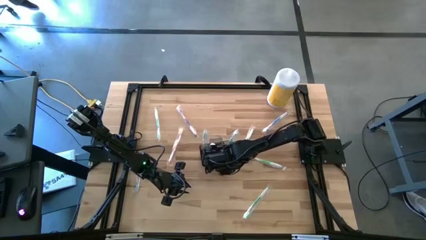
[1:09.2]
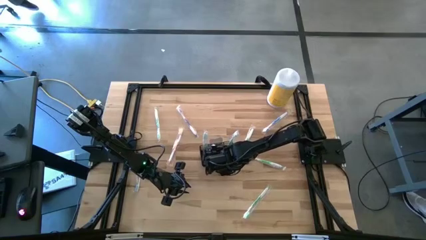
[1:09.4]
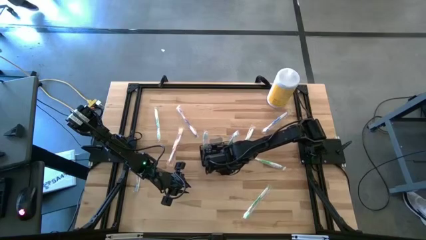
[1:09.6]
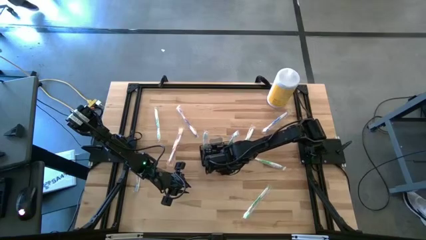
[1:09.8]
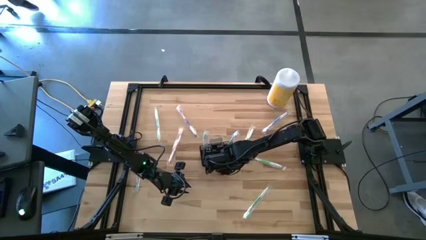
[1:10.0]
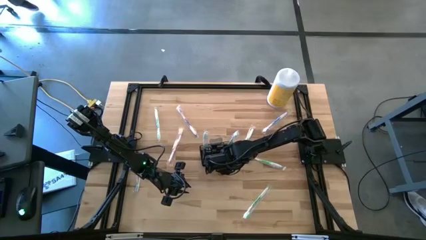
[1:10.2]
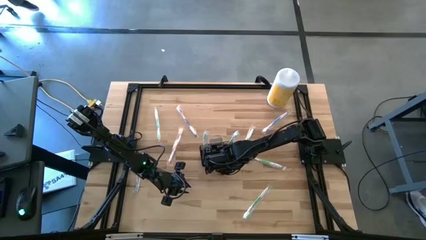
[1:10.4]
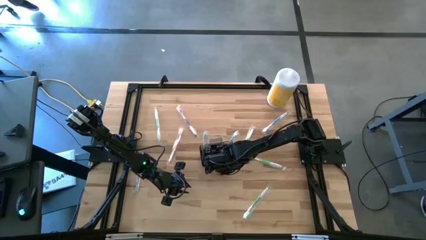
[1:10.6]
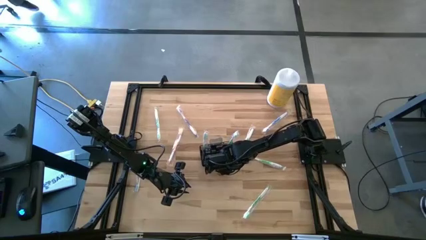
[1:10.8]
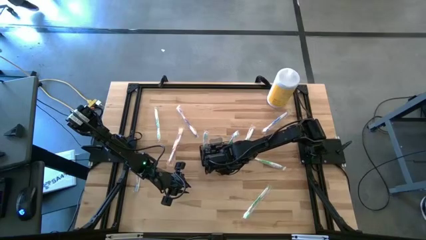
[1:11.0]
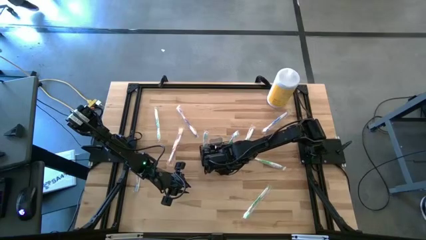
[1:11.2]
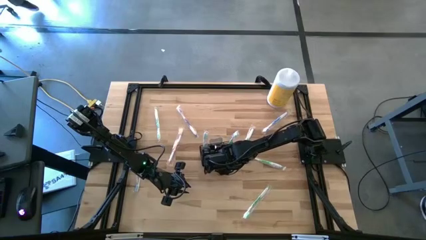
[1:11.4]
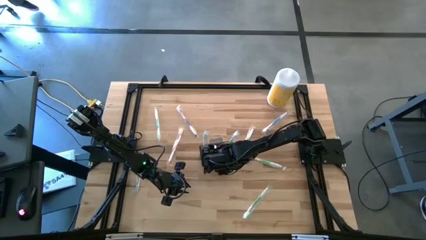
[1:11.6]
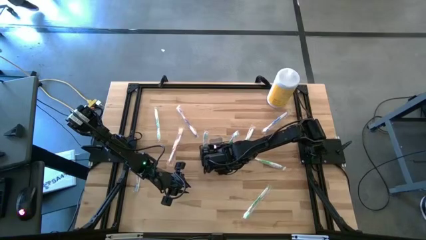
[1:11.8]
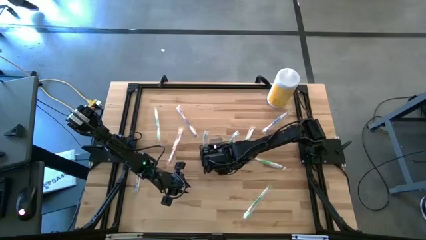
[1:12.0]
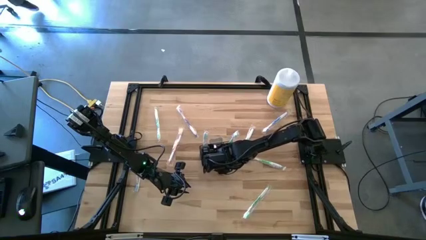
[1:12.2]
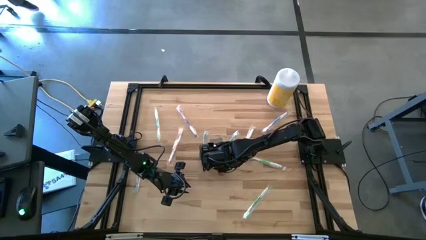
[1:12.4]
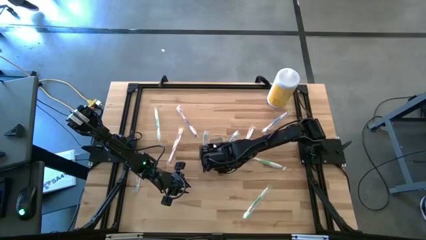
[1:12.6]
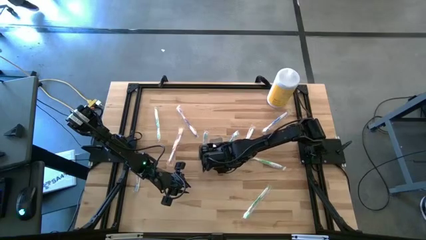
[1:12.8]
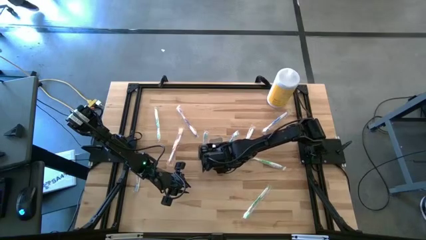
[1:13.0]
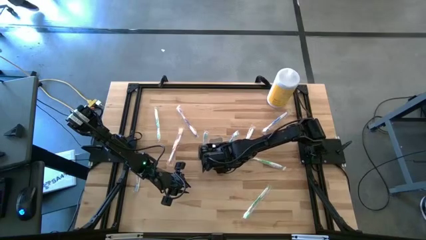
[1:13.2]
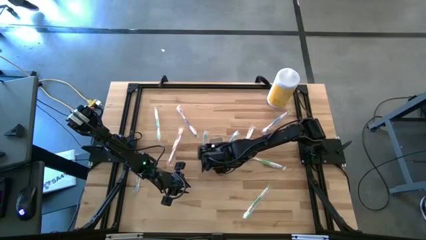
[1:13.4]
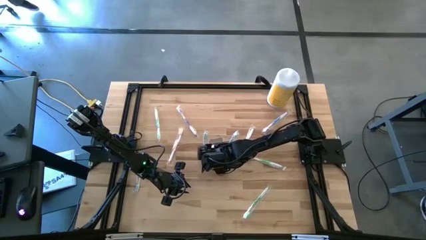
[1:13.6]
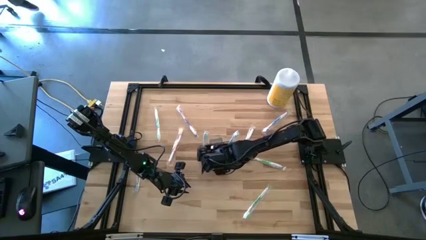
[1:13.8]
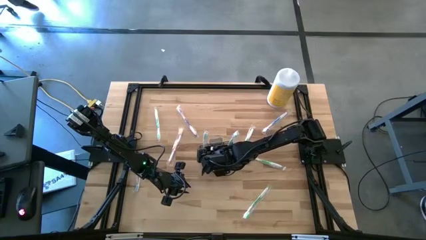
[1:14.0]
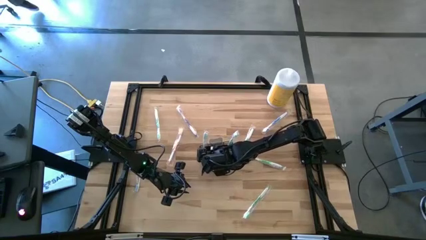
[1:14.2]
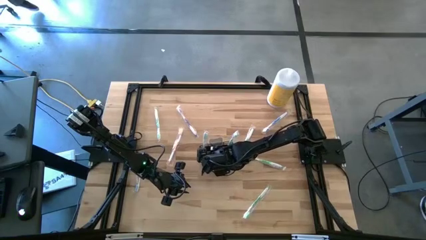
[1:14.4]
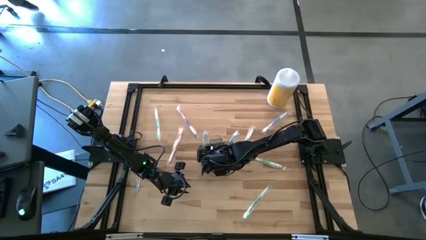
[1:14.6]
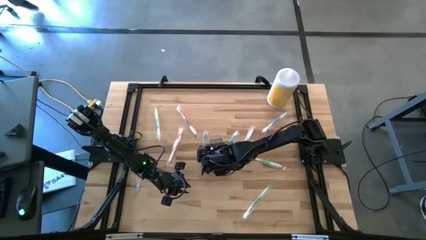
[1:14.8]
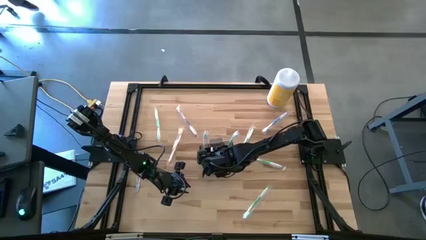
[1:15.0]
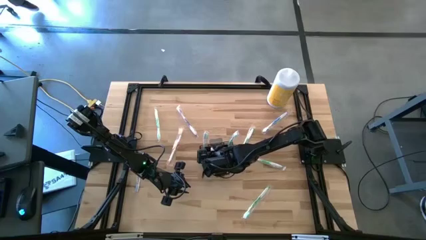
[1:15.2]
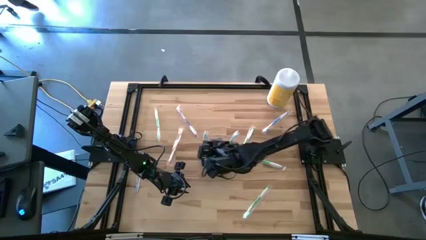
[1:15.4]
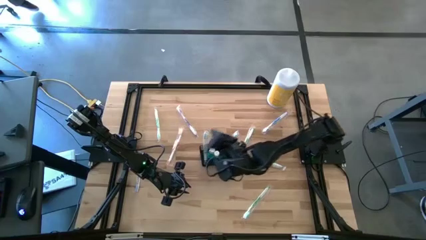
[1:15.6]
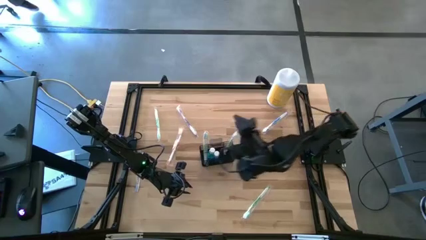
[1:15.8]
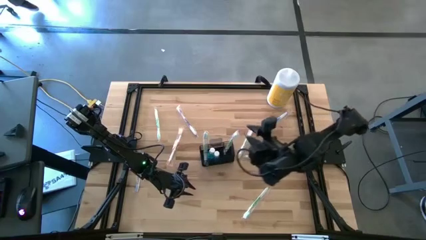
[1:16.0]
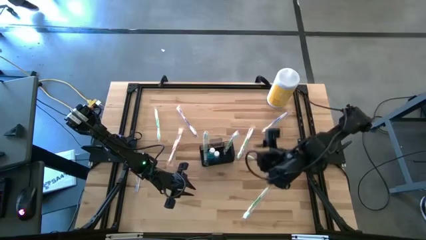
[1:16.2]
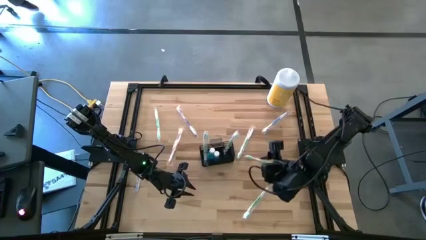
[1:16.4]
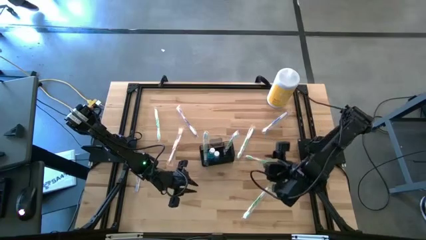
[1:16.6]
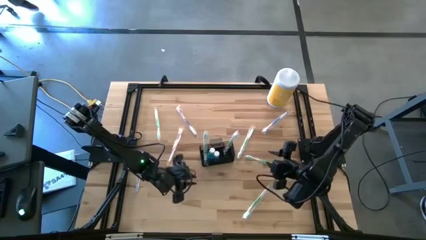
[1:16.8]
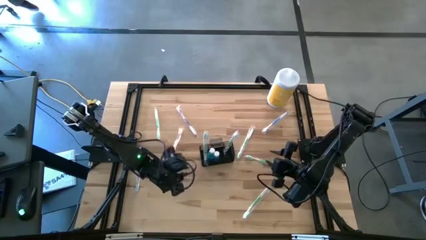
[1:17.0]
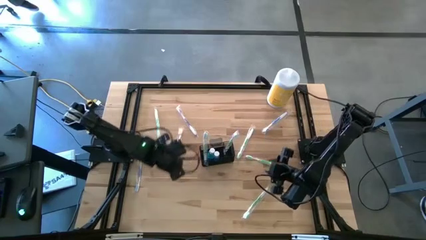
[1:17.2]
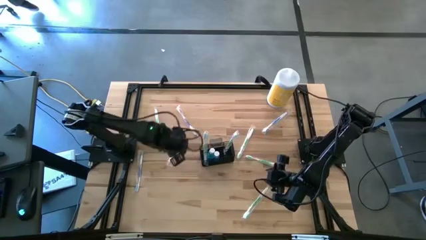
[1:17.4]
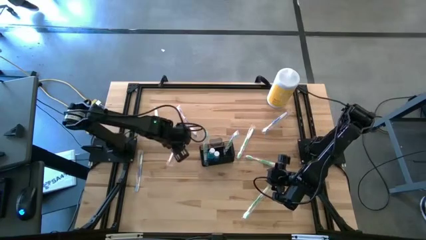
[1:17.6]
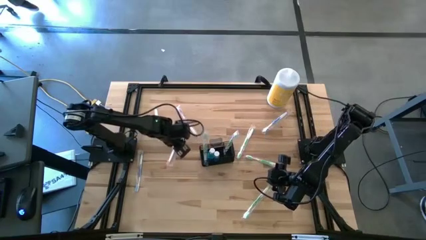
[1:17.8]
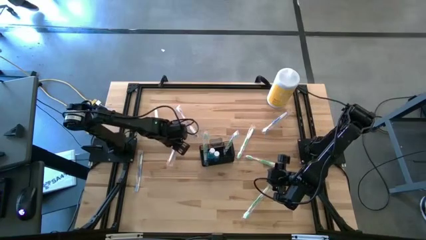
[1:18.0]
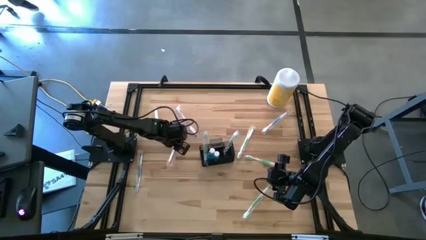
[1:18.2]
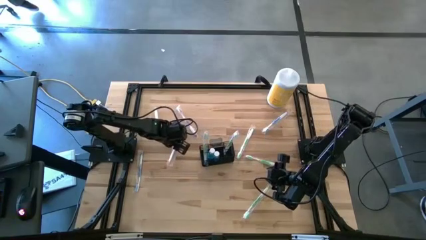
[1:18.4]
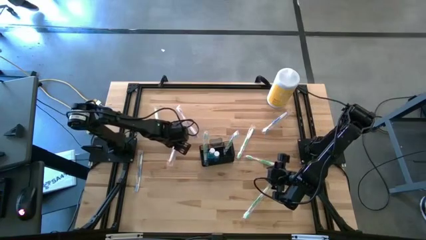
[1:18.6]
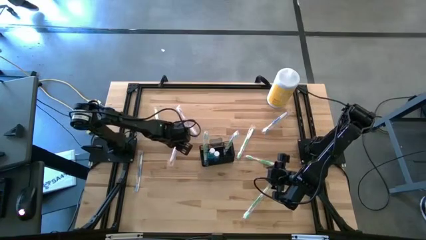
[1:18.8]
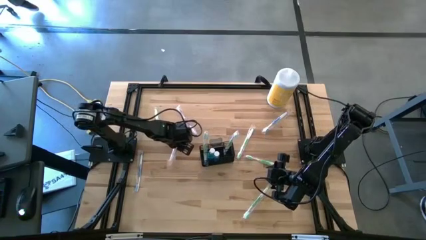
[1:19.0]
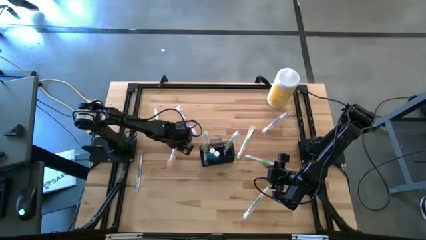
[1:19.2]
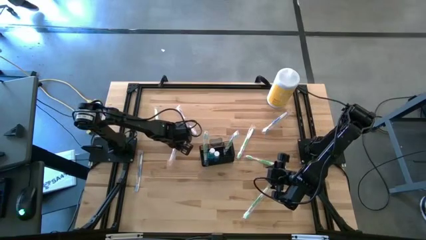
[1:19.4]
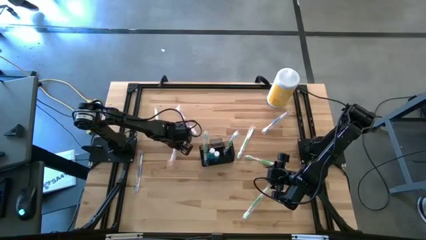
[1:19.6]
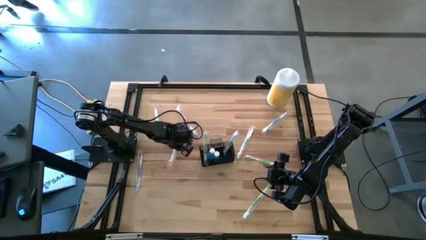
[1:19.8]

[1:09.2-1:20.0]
Task: Pick & Place toothbrushing station
Put the orange toothbrush into the black mesh organizer

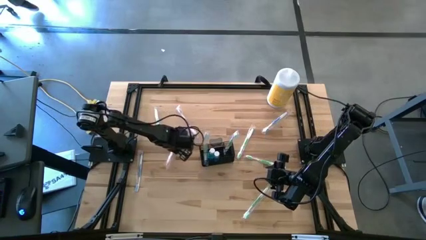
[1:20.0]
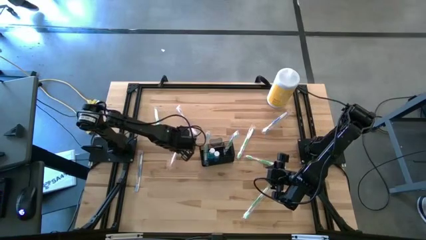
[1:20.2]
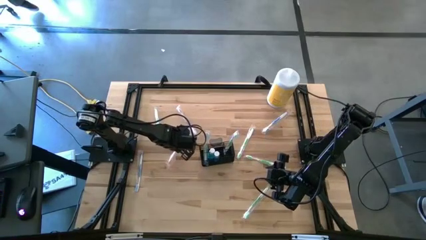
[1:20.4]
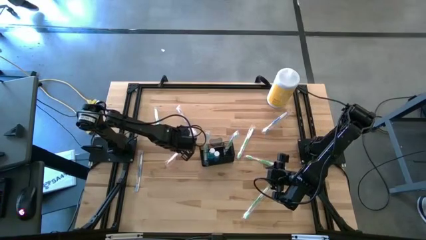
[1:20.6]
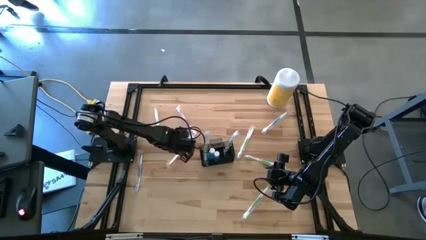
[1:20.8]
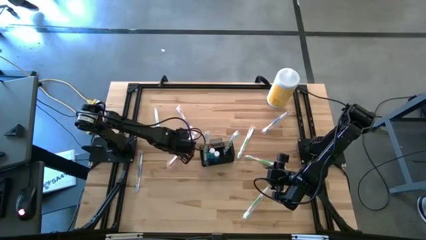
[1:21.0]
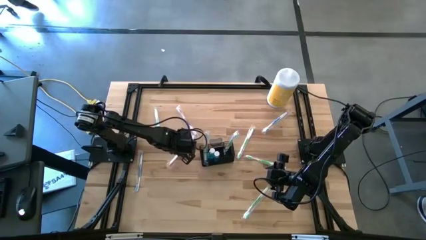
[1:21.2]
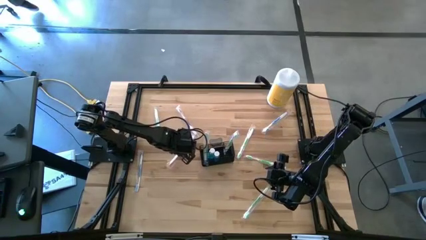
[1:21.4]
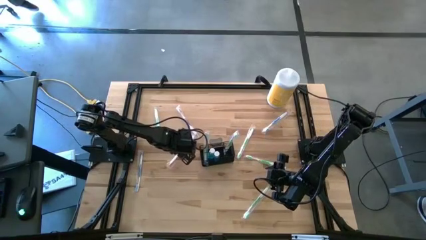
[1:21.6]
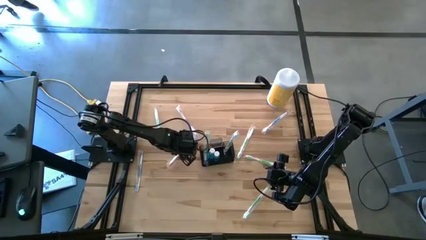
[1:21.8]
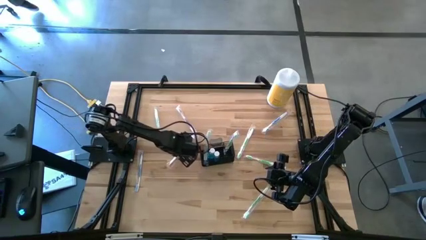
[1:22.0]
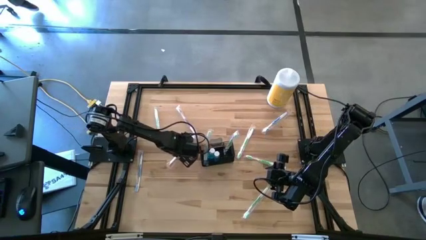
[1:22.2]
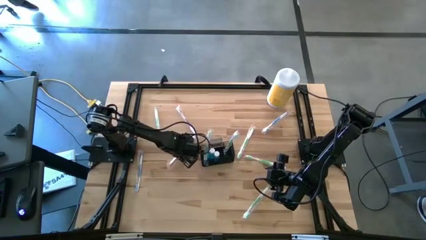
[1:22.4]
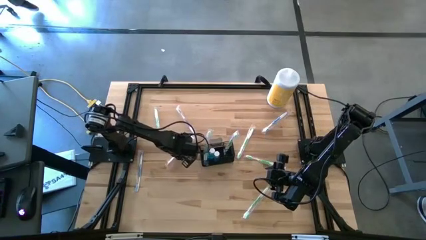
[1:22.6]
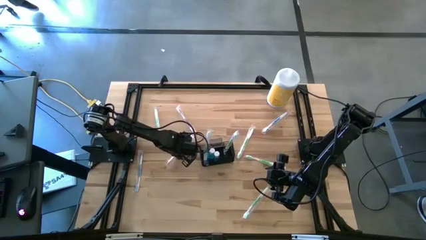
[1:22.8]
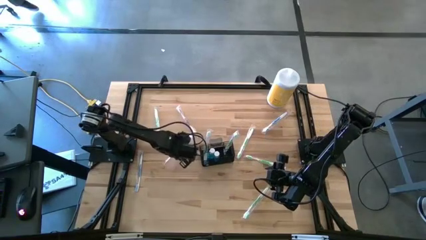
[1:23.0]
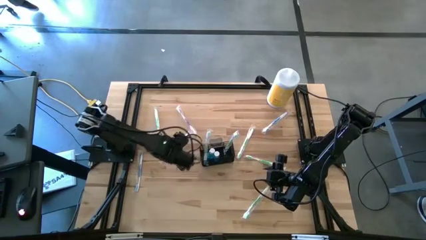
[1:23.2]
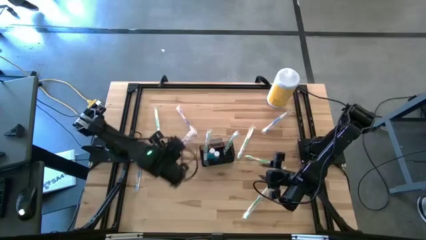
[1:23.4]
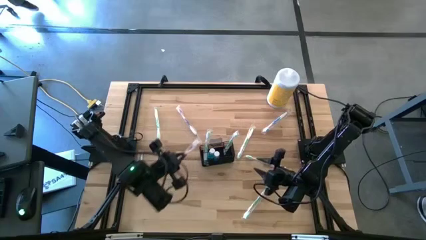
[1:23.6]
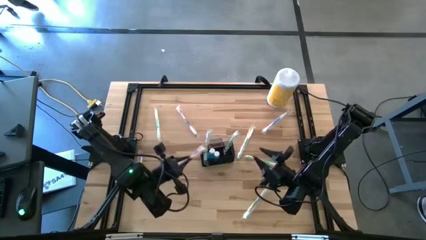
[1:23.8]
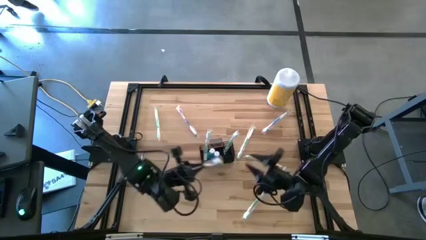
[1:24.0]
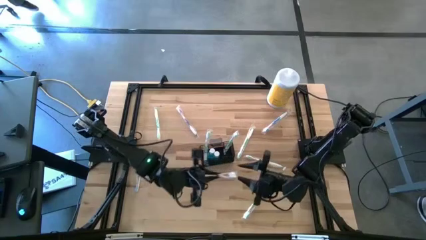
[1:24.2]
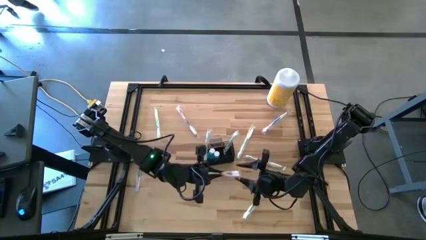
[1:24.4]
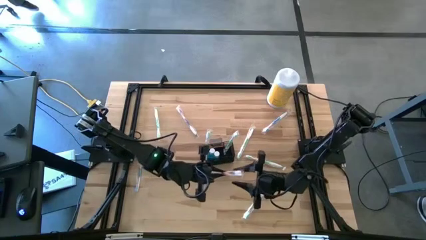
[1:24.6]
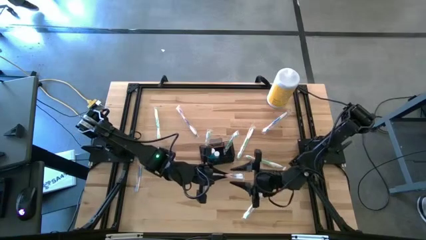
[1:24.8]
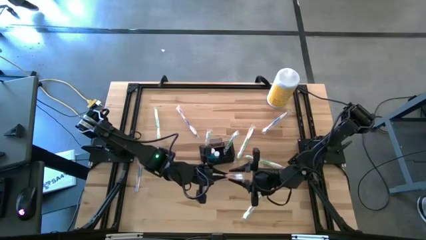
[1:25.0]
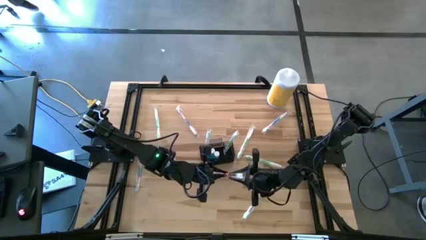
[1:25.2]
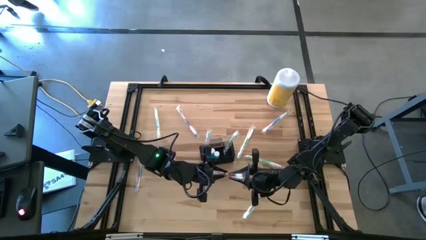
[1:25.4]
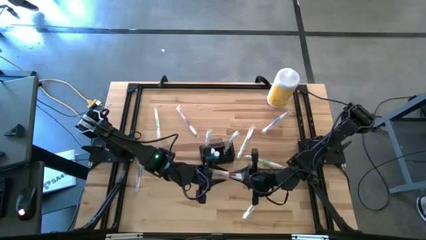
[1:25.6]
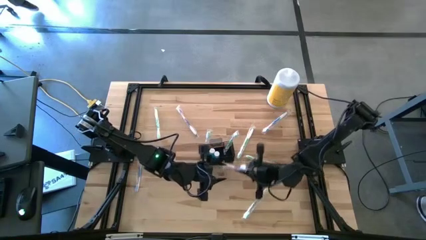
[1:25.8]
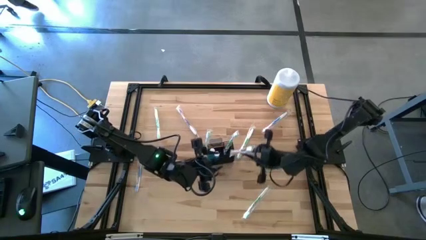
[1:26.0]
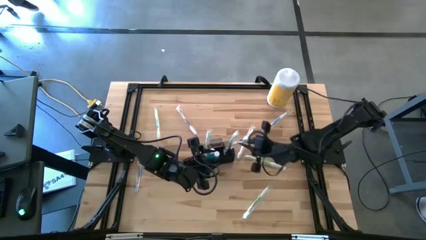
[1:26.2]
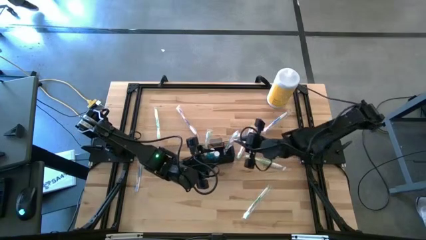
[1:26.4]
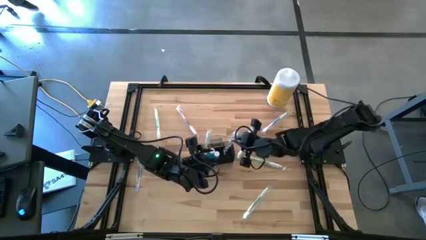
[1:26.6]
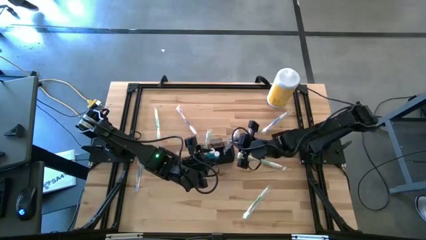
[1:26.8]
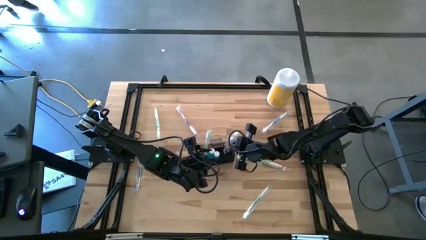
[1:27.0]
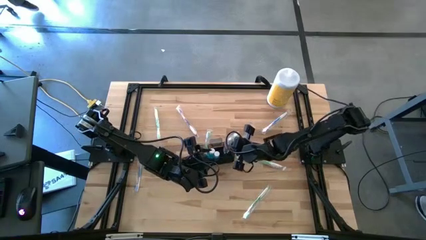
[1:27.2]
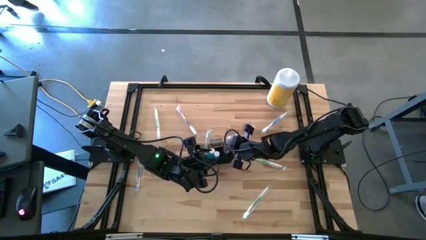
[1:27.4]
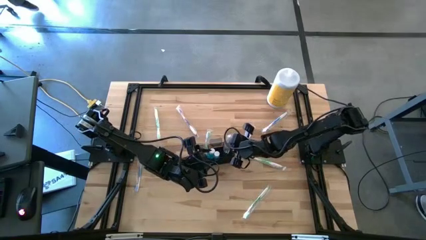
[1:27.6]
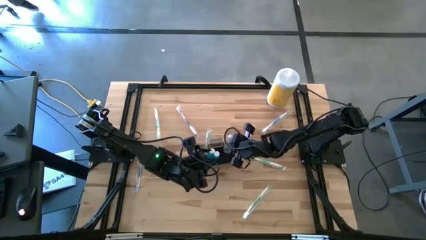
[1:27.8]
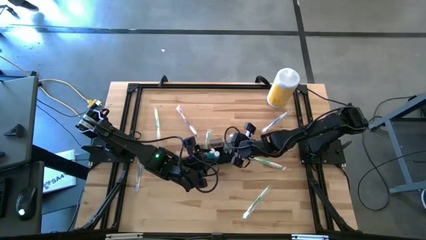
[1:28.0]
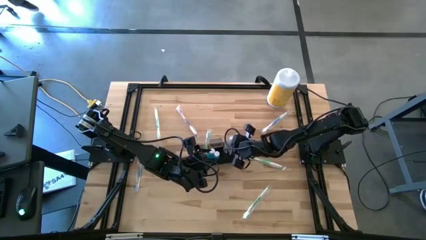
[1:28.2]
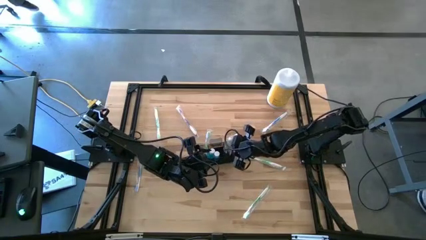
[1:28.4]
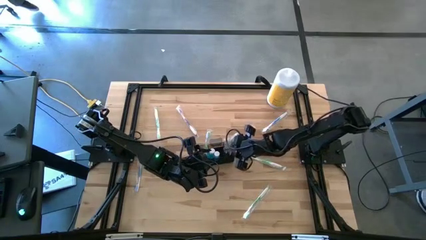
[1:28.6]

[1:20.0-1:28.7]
Put the orange toothbrush into the black mesh organizer
